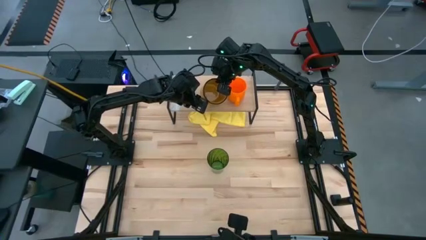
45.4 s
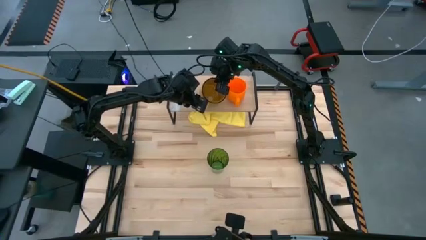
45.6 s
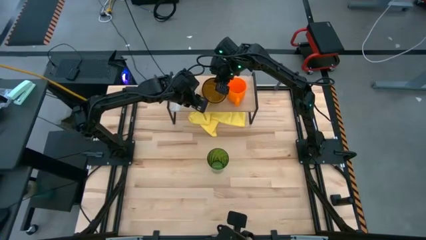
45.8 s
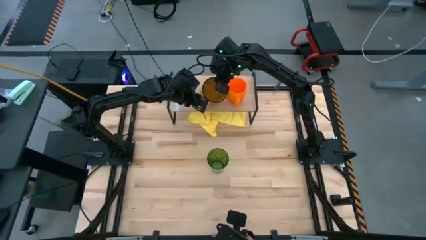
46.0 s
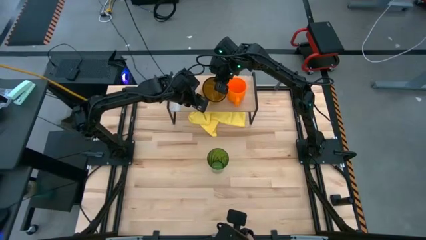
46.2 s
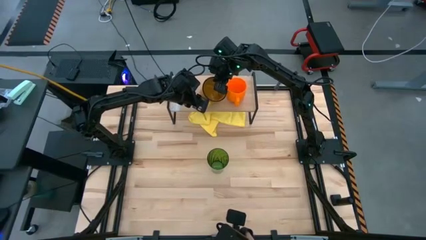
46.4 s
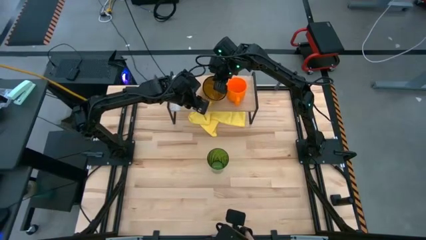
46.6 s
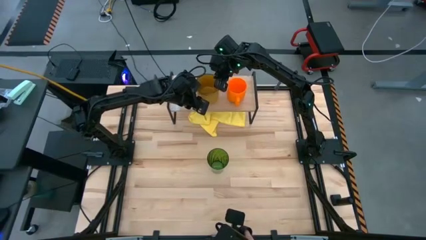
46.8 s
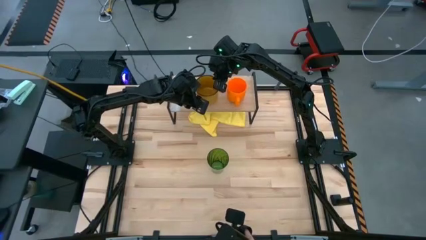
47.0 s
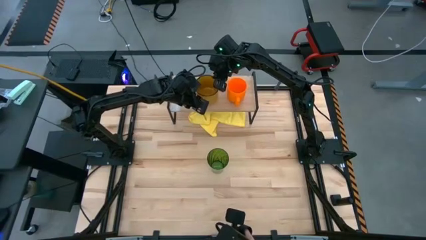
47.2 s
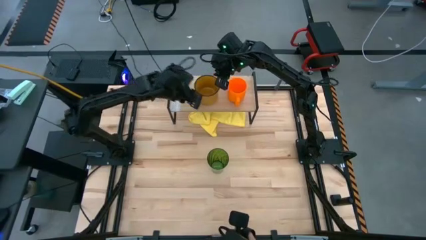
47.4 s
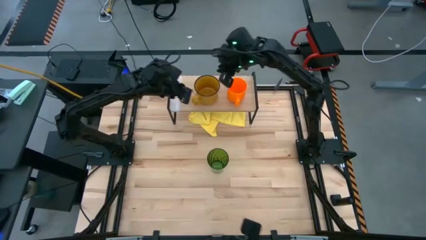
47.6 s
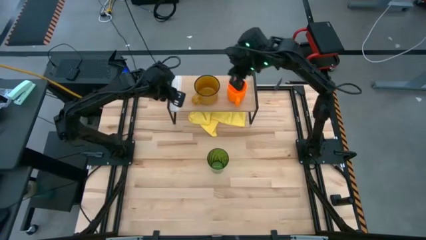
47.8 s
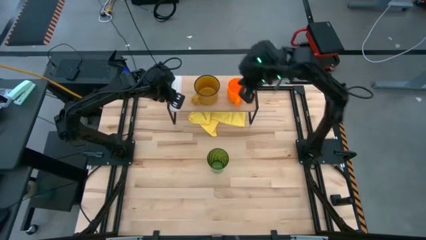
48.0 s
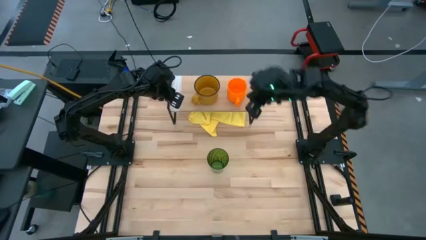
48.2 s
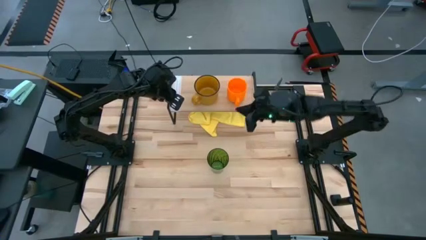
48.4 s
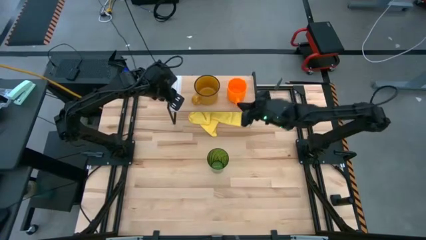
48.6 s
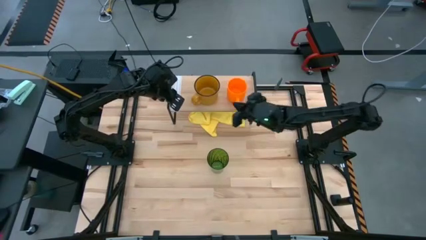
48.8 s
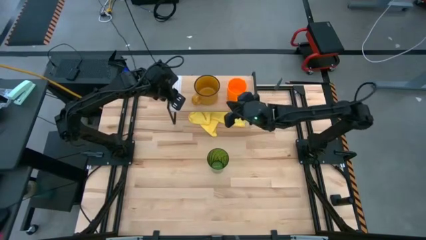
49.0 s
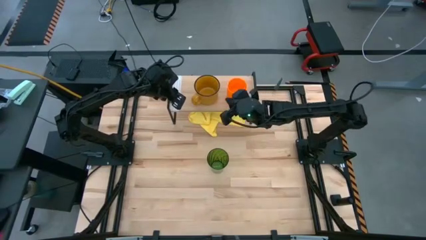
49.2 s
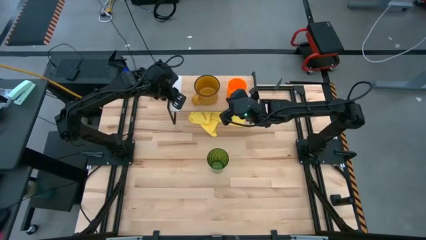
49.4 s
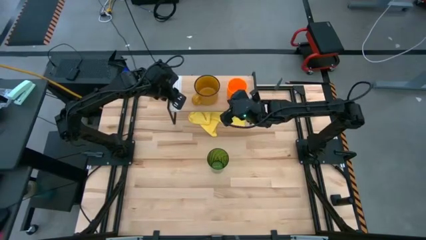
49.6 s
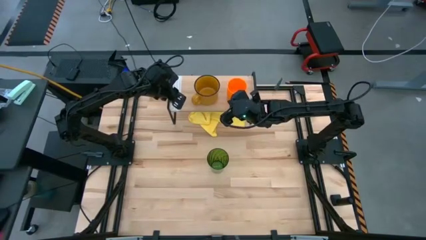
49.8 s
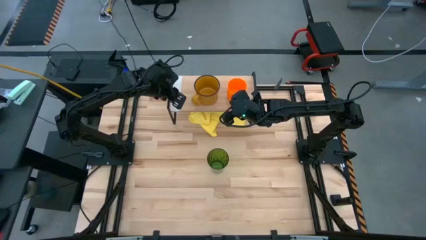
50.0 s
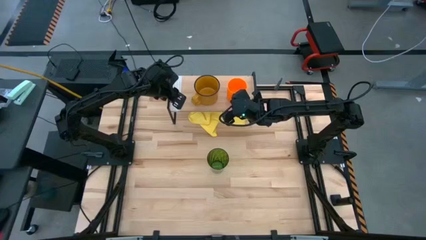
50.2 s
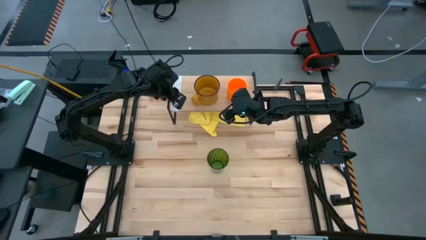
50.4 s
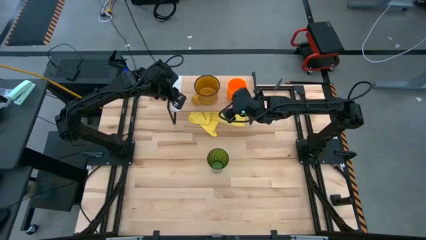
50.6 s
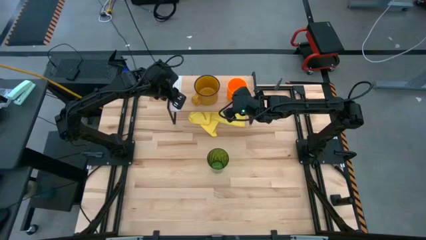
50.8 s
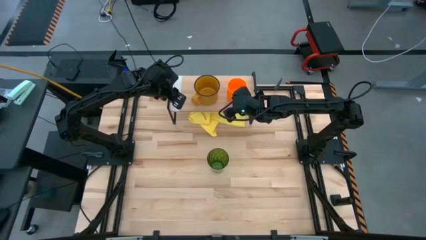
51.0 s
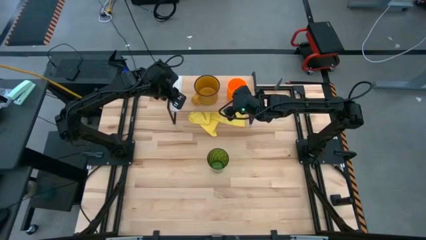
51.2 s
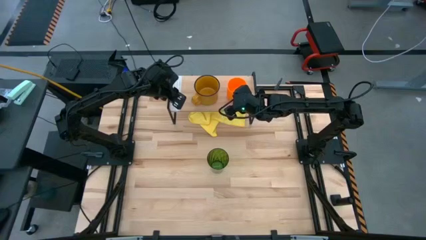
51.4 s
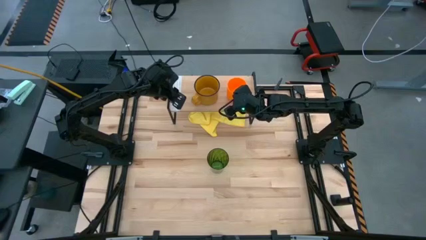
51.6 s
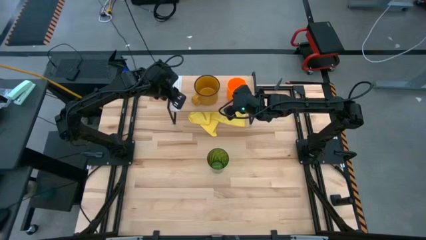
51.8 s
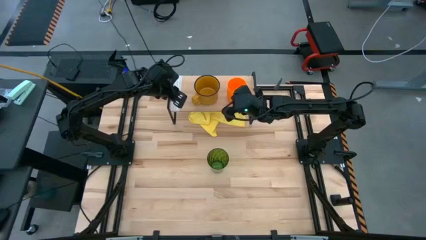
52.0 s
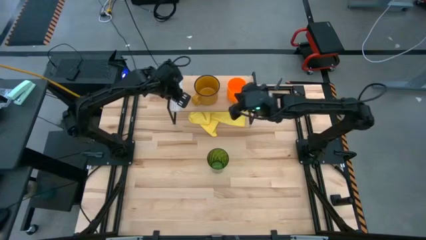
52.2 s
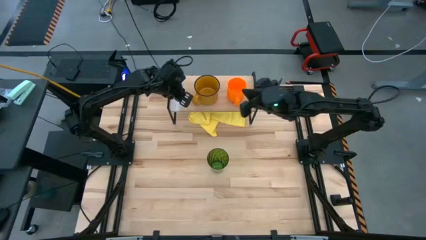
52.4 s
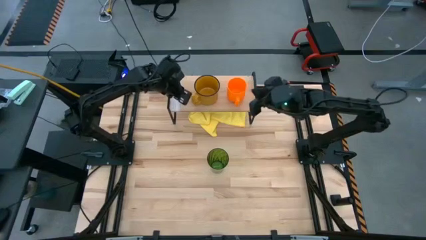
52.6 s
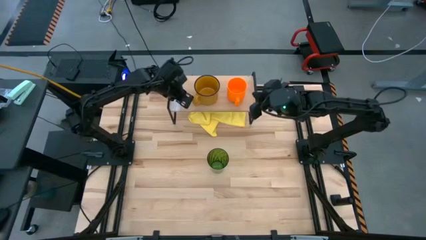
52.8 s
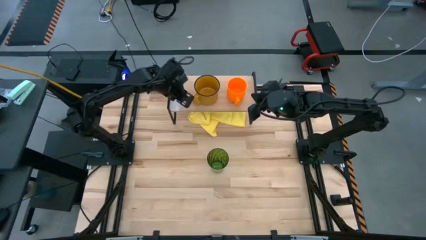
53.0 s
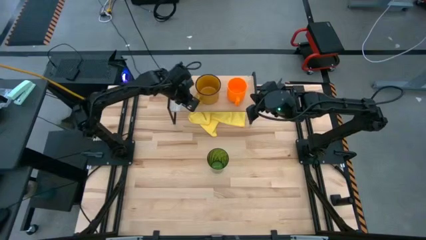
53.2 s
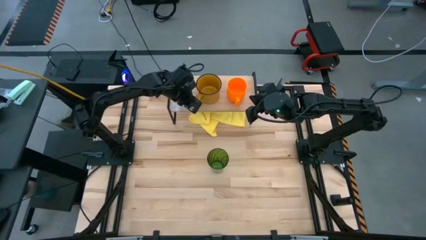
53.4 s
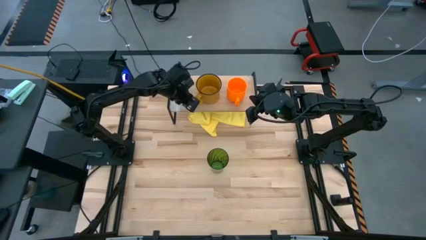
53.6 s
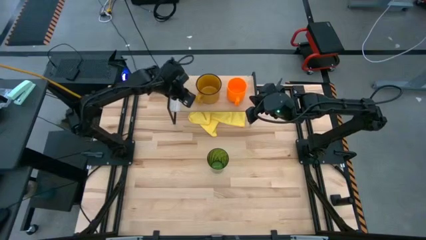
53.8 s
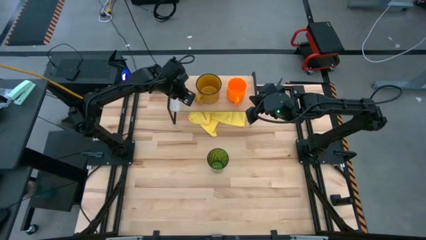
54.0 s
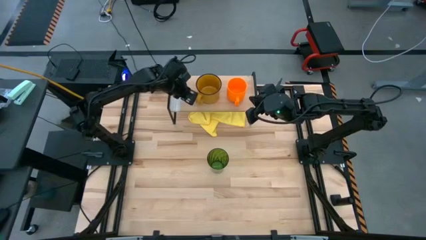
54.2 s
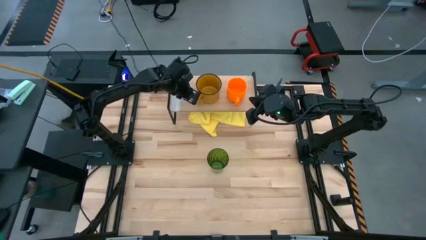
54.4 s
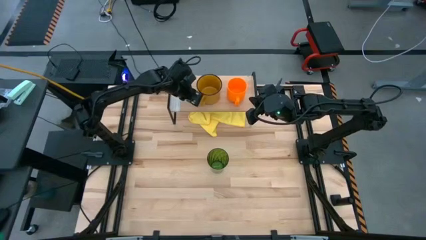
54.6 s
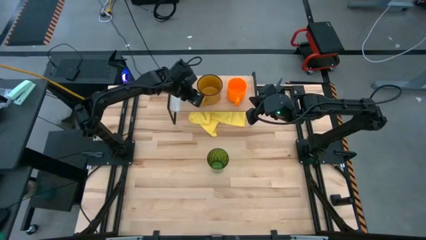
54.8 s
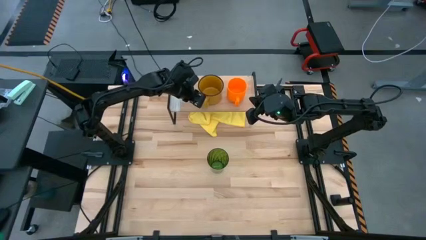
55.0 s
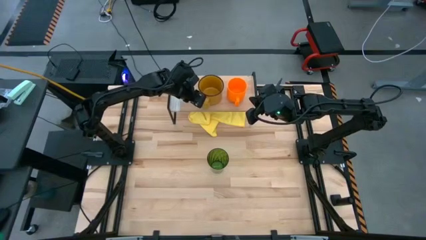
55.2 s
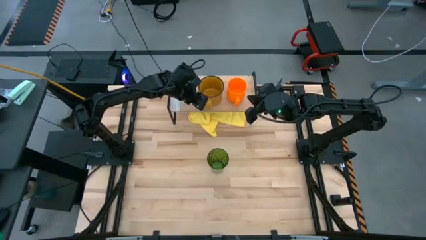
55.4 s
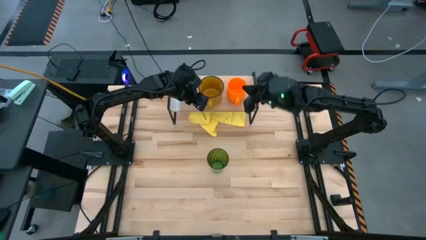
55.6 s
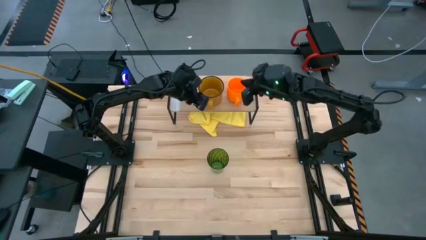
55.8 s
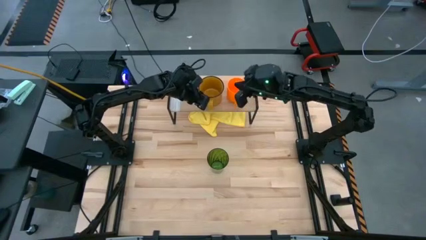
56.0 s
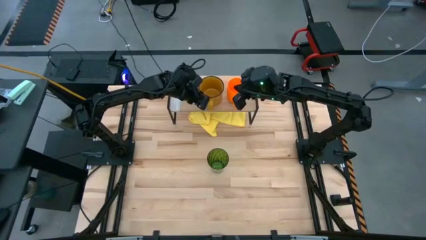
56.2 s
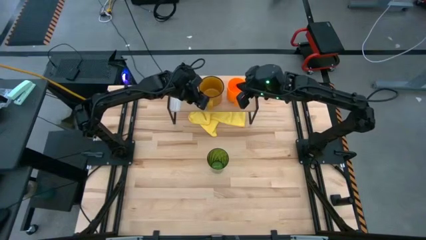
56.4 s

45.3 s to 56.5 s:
Task: Stack small to large cups/mugs on shelf
Put the yellow mug on the shelf

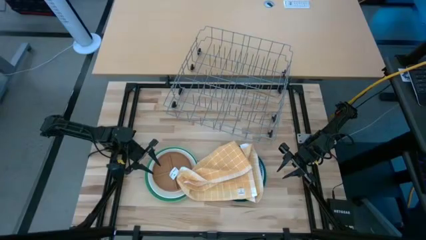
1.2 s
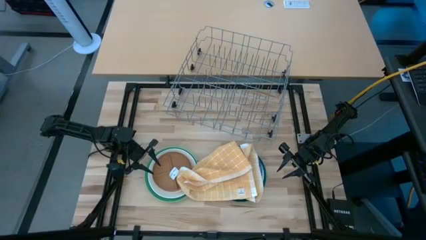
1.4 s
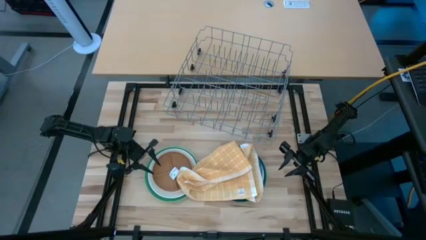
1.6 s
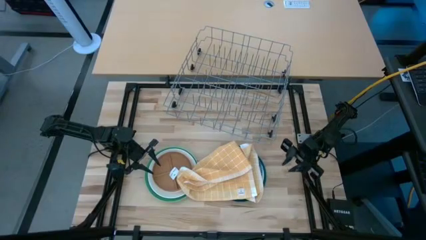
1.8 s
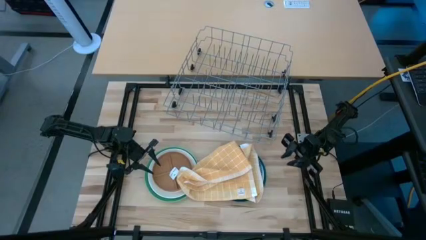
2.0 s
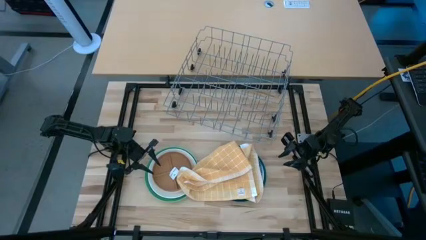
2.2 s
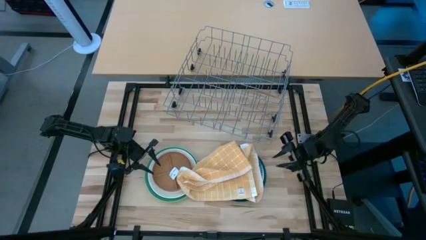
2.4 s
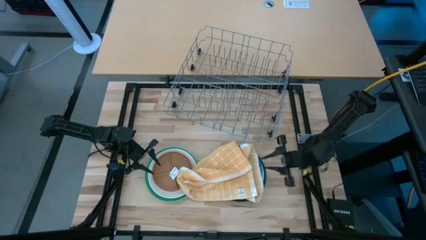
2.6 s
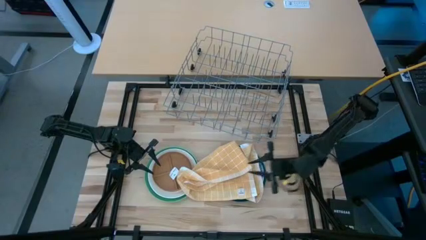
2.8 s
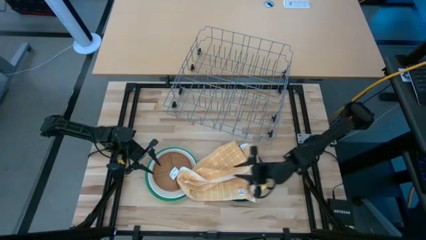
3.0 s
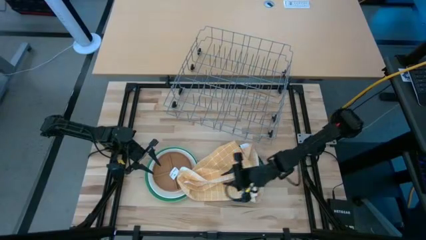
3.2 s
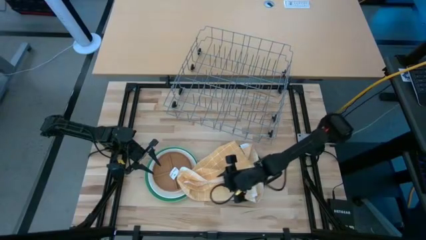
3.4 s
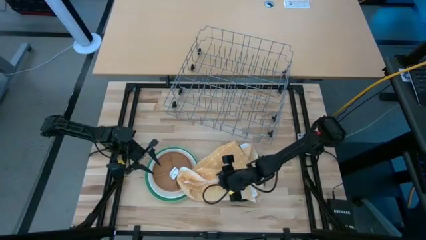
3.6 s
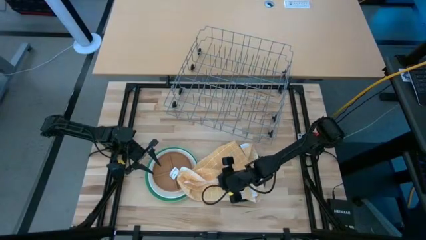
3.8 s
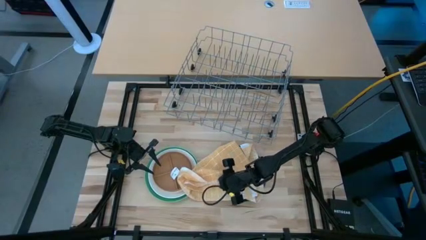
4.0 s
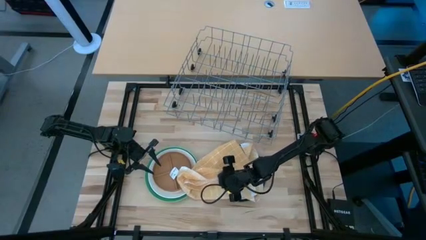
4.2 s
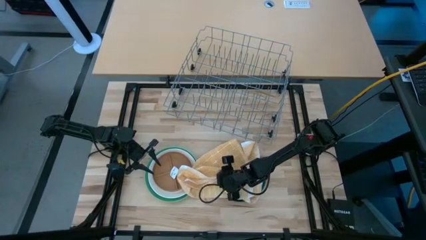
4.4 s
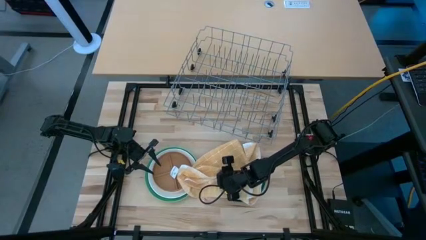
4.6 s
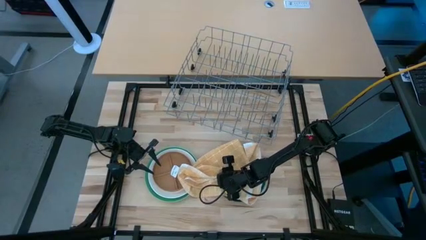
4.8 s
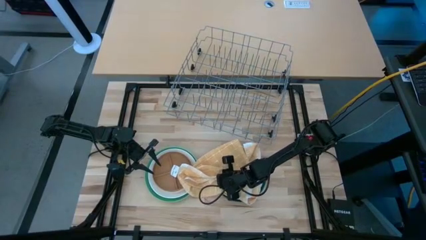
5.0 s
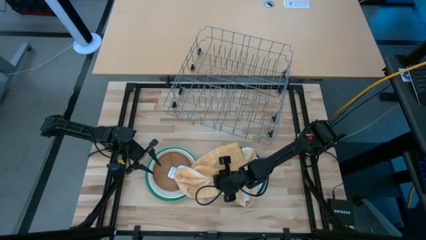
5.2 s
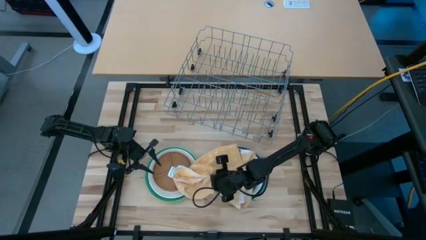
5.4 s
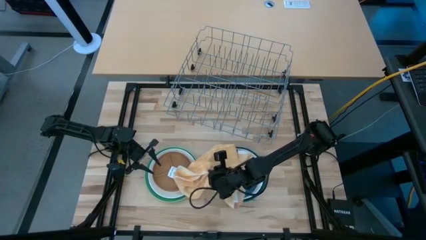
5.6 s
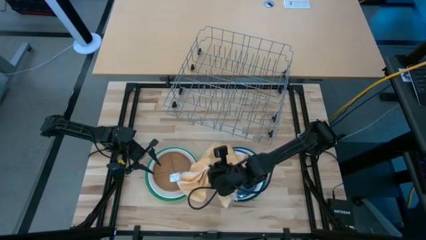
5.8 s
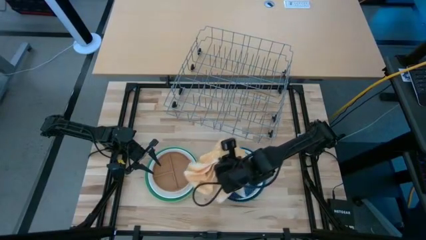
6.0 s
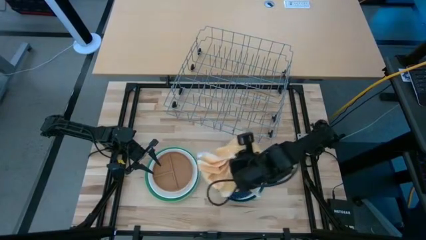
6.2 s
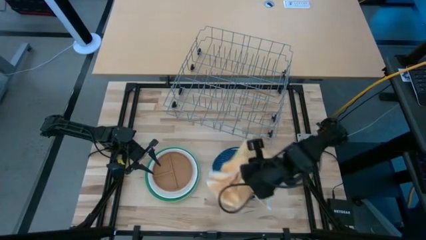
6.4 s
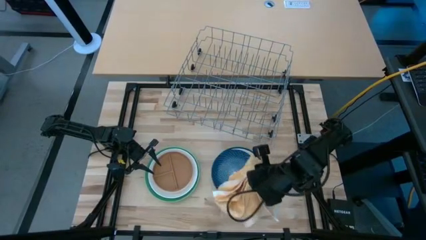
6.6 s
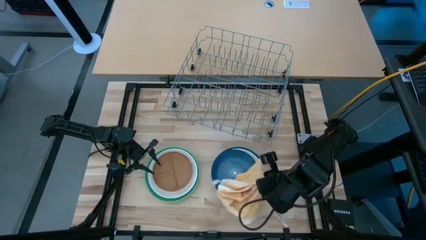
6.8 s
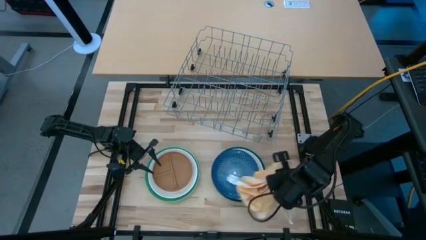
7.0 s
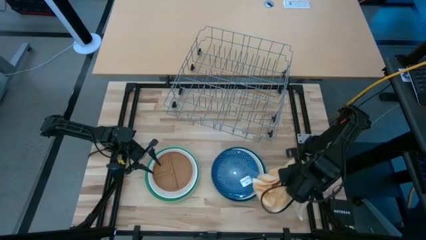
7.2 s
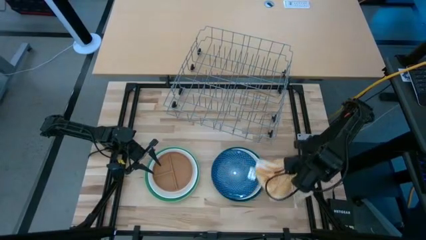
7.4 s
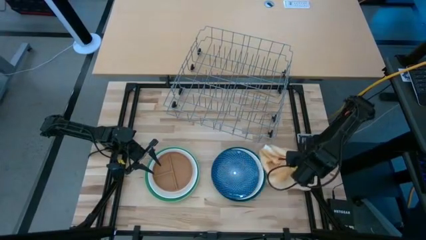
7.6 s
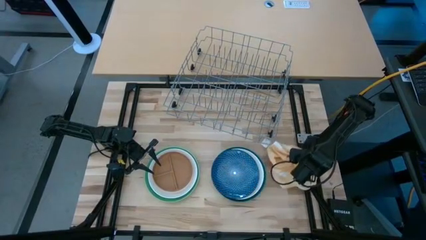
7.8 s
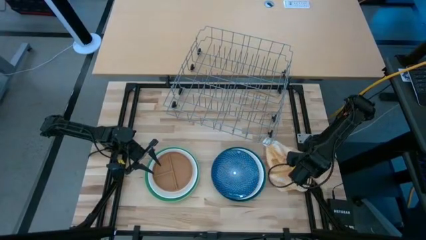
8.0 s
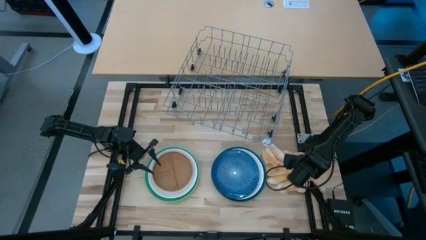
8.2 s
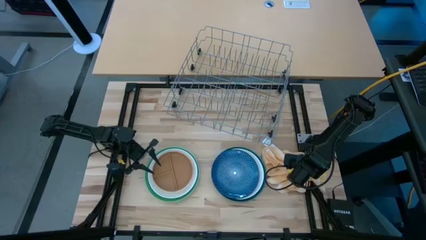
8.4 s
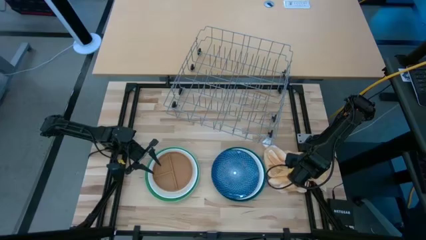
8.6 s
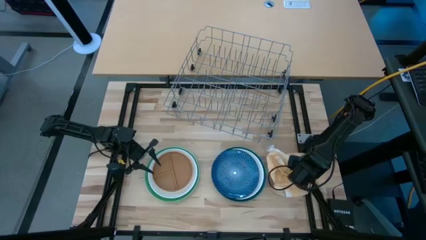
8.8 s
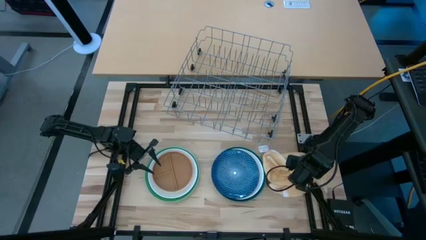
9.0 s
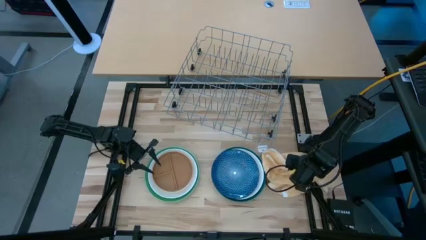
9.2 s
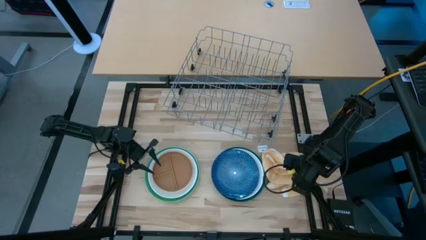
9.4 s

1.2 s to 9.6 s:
Task: Sort dishes
Remove the towel from the blue plate
